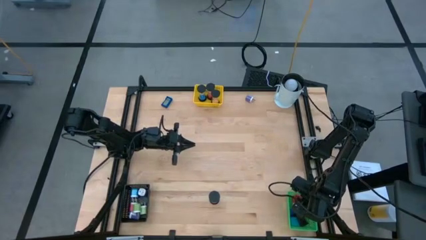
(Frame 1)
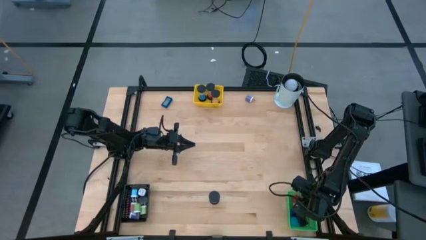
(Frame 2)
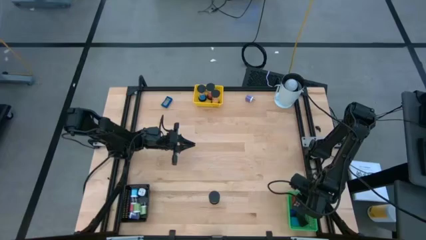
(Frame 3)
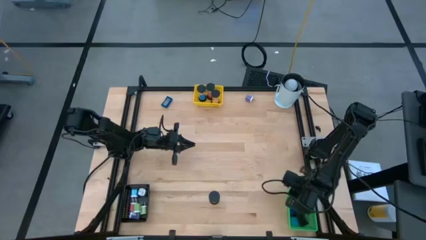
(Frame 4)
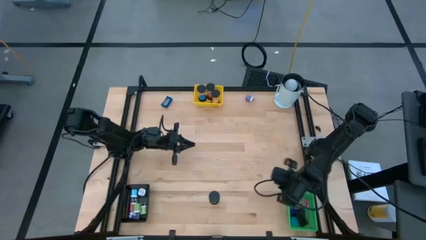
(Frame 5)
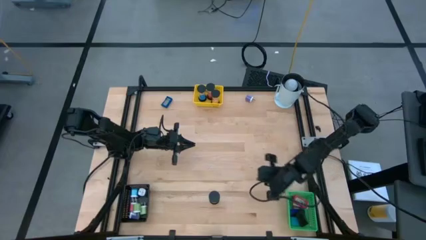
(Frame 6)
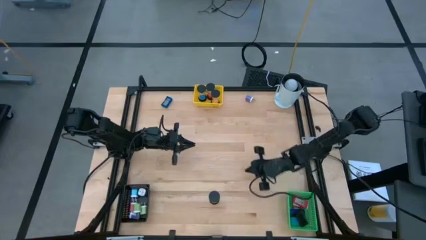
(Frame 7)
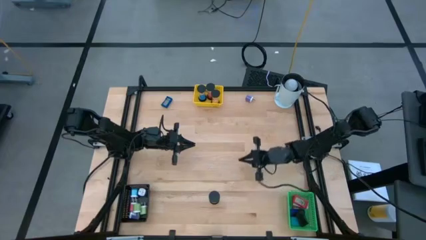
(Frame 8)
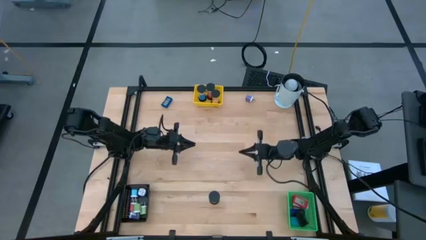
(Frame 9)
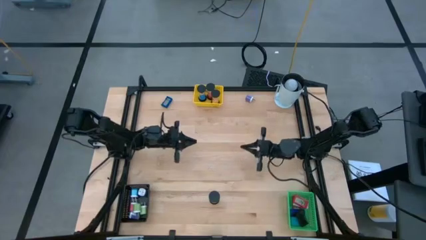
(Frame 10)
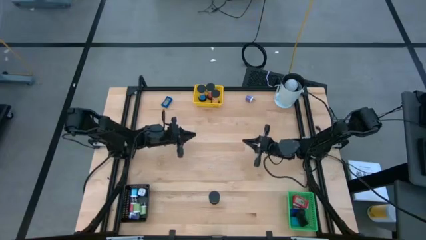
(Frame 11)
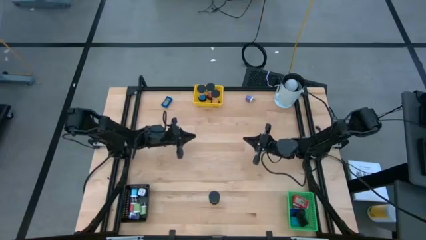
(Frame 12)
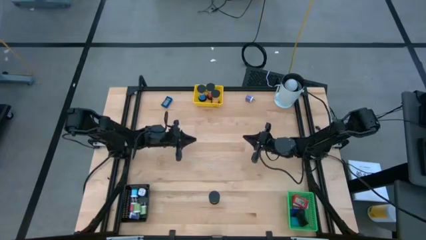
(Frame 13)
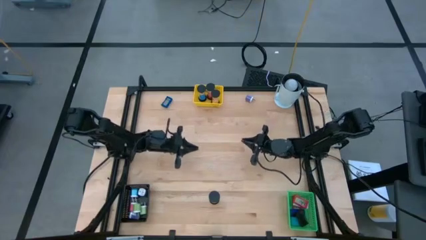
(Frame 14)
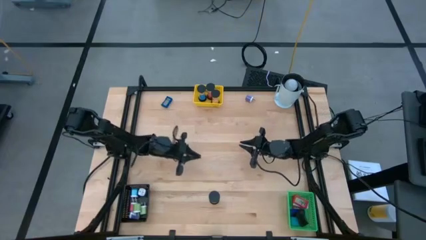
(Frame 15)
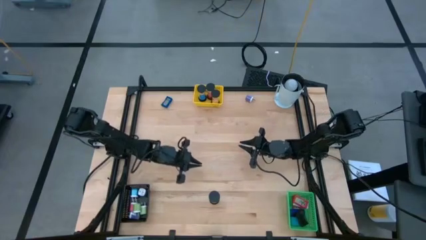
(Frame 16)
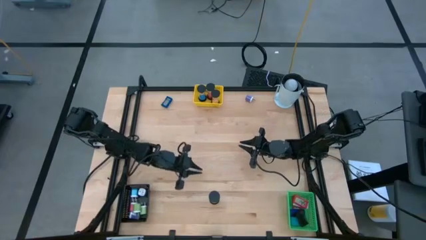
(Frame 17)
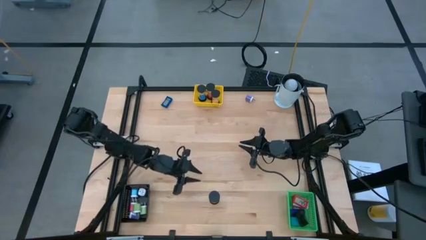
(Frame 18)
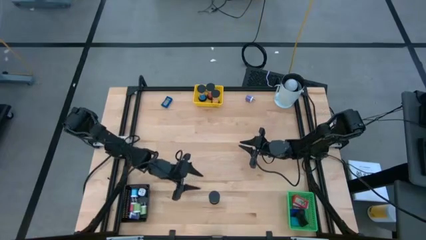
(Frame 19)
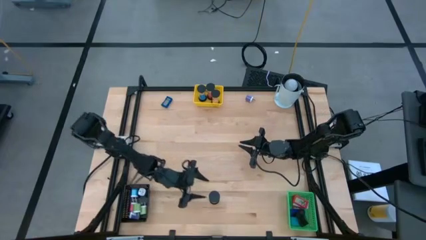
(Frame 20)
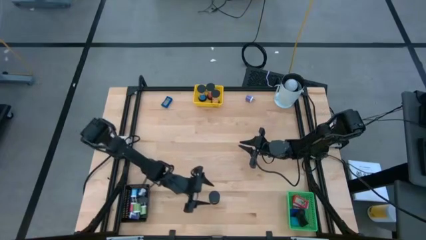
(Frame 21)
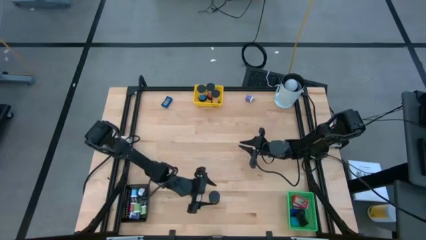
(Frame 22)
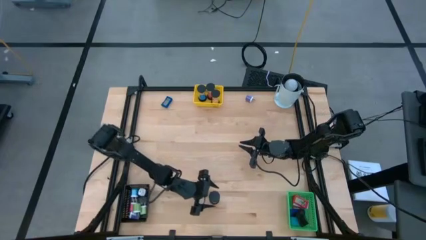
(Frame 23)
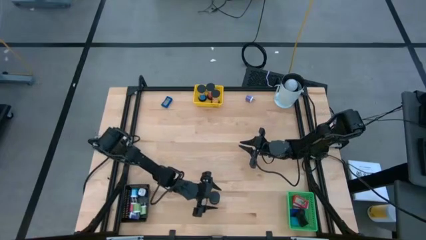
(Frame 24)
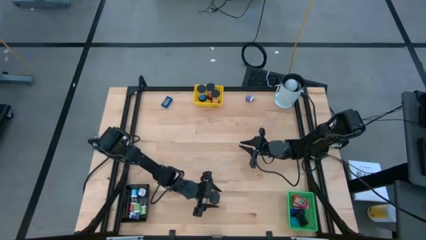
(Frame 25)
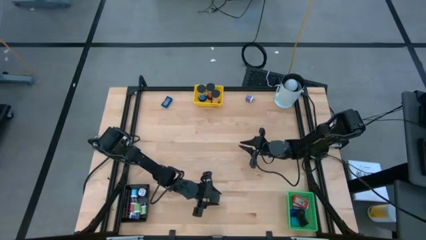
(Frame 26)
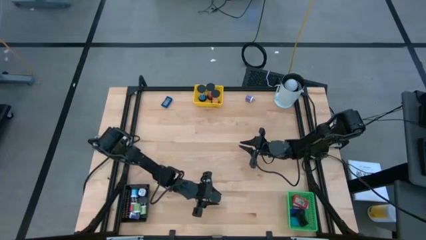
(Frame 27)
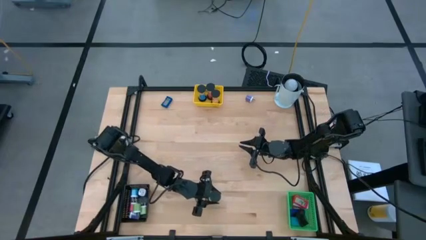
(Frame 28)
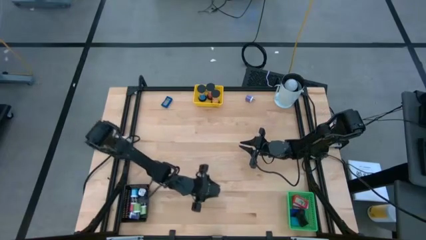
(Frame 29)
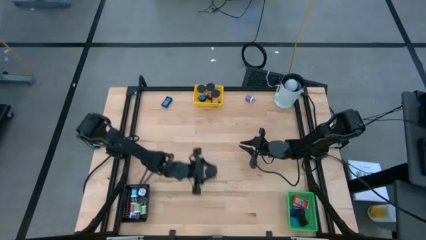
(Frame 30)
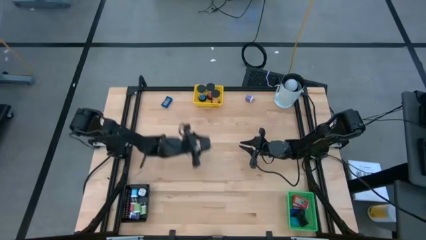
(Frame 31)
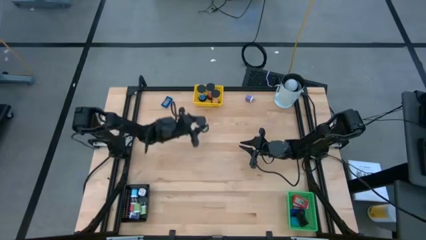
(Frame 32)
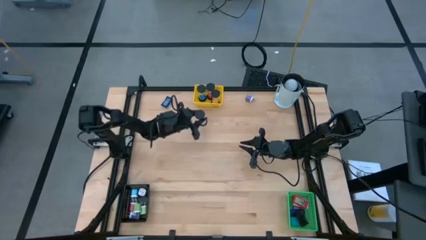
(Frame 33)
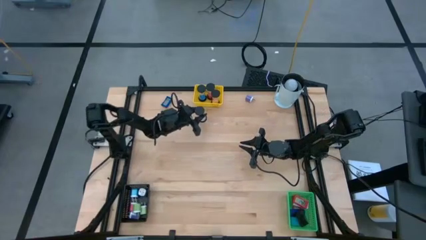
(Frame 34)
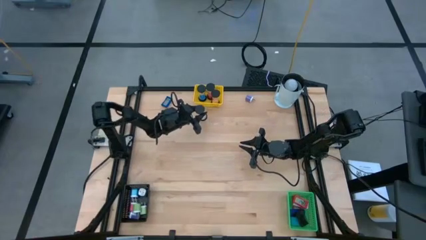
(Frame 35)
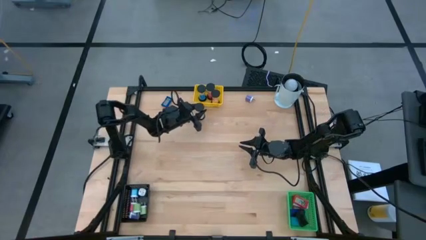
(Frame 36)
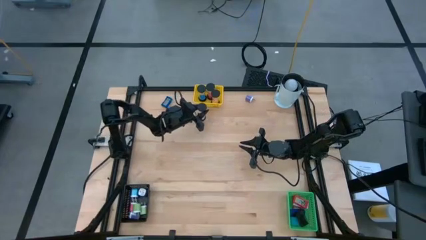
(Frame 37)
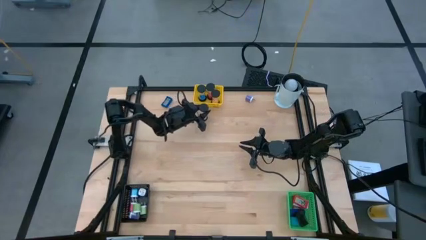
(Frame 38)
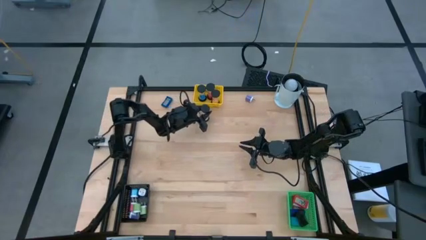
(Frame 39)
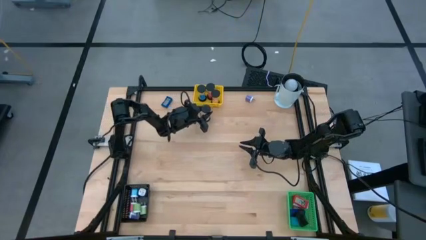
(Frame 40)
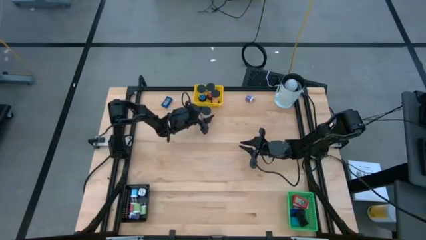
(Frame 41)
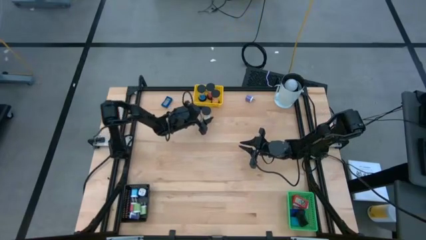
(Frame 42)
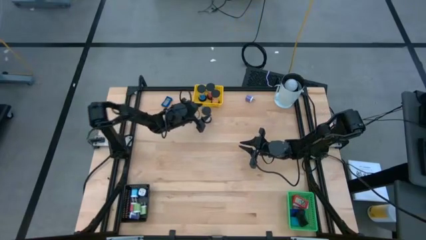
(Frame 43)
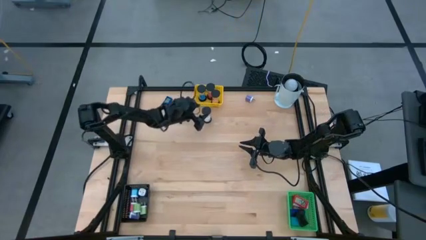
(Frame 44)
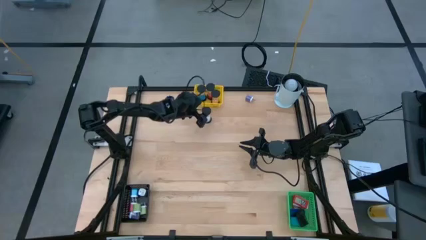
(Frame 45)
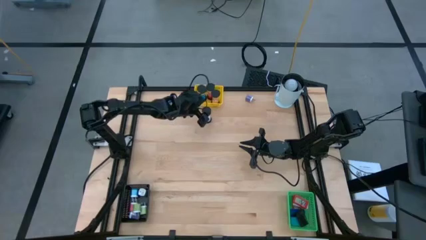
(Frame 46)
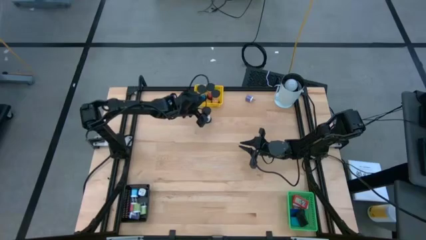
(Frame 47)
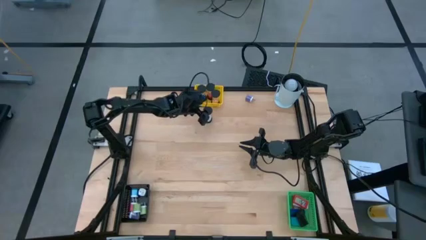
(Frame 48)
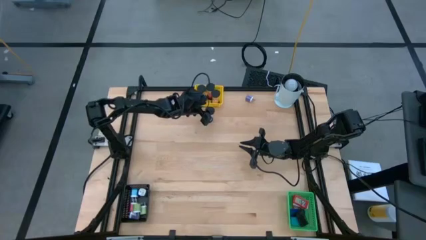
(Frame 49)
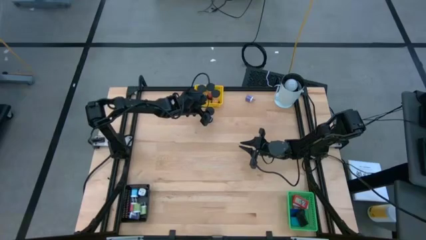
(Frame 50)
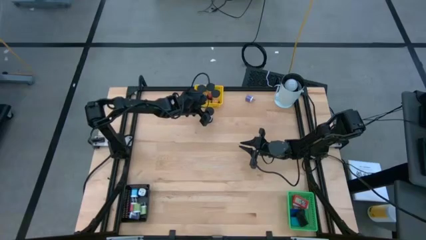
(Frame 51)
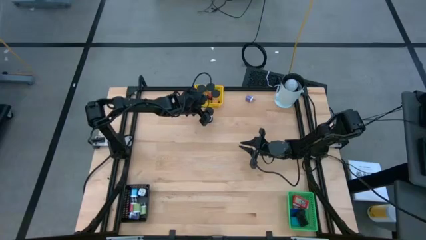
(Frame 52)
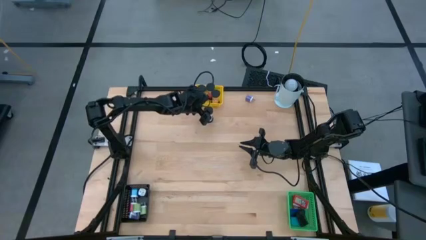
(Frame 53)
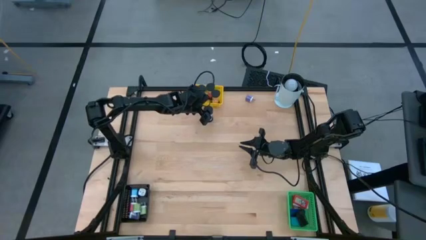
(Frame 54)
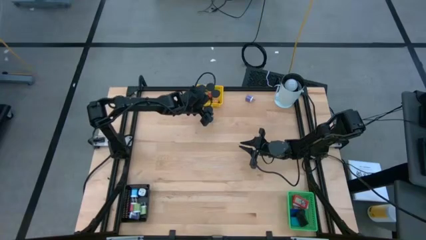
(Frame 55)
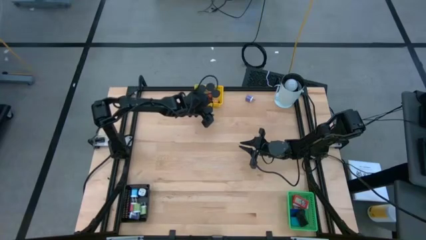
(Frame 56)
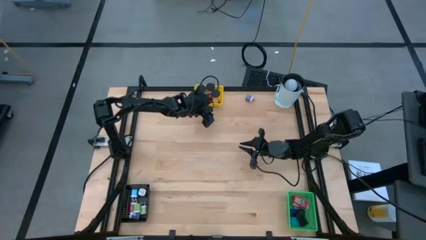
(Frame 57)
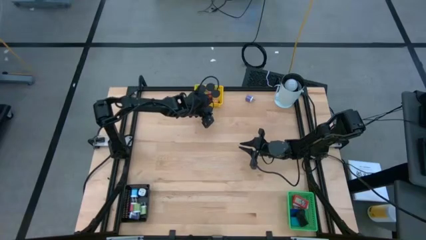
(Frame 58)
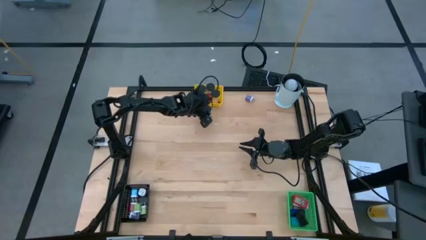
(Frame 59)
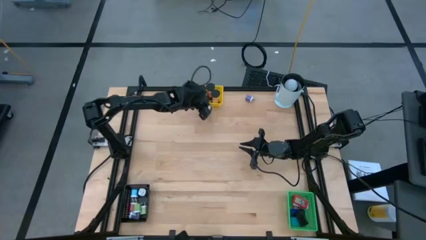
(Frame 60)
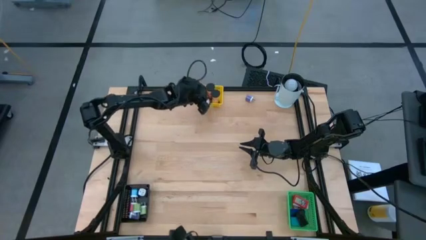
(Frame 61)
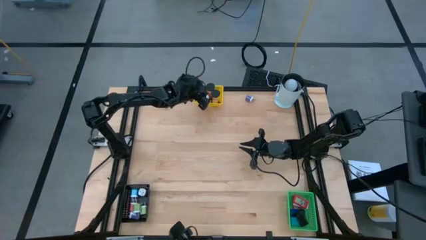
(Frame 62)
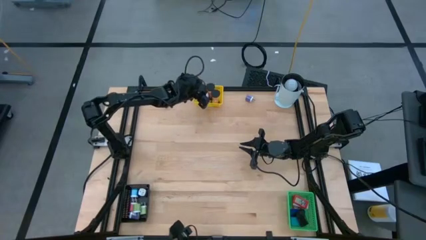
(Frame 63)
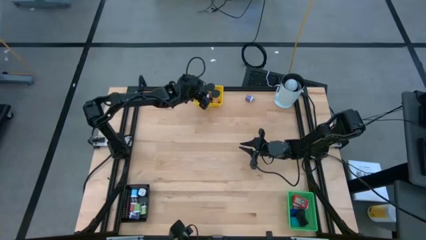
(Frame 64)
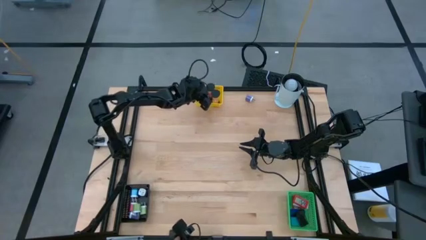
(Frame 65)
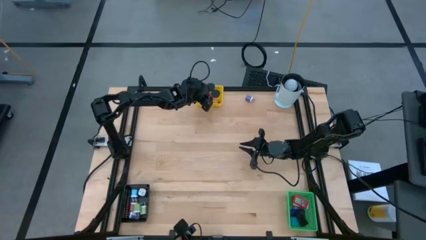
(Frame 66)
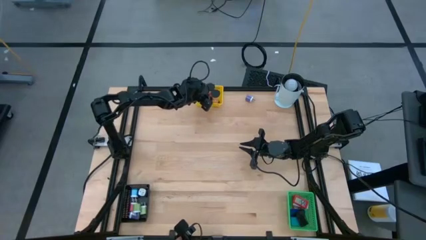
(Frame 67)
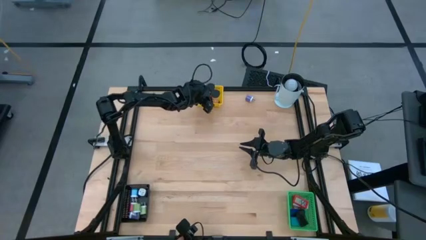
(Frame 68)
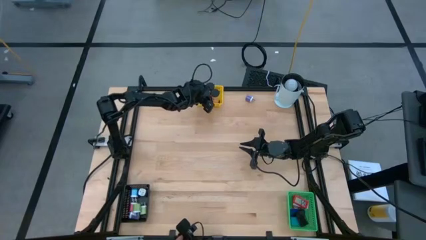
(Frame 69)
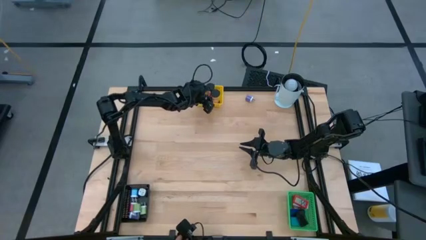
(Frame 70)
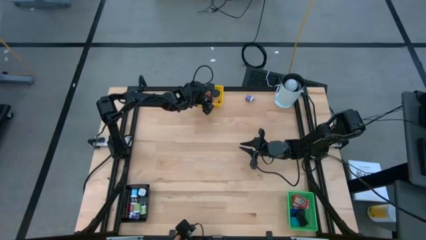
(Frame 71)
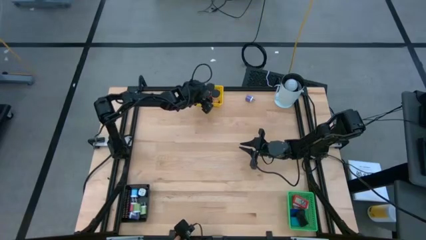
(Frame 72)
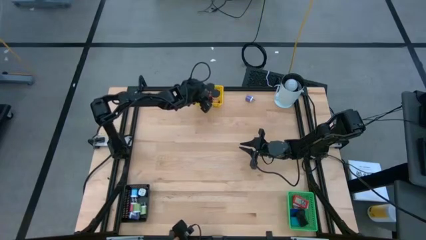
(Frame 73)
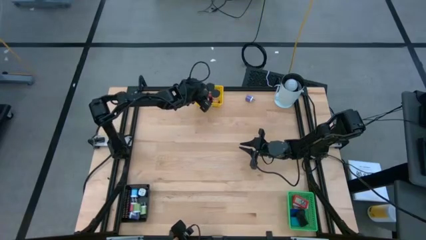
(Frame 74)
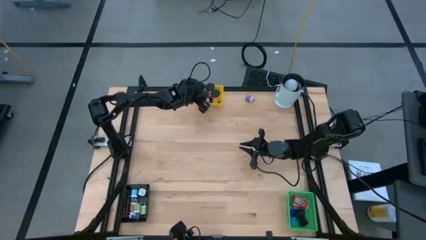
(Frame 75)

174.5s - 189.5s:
Task: Pick & Place Office items
Put the white hour glass into the yellow bin
